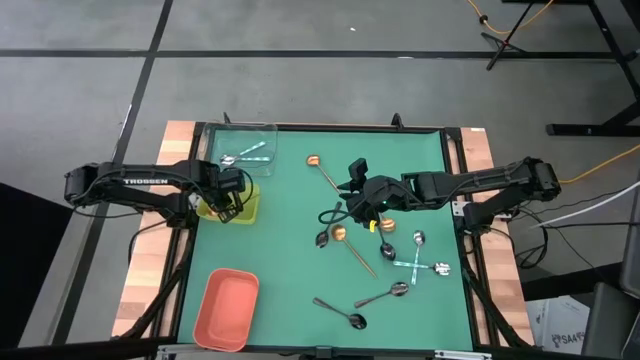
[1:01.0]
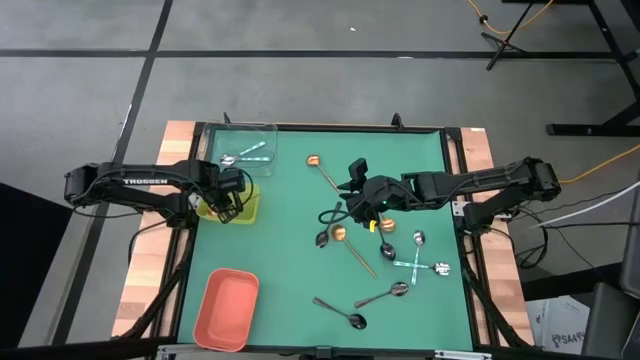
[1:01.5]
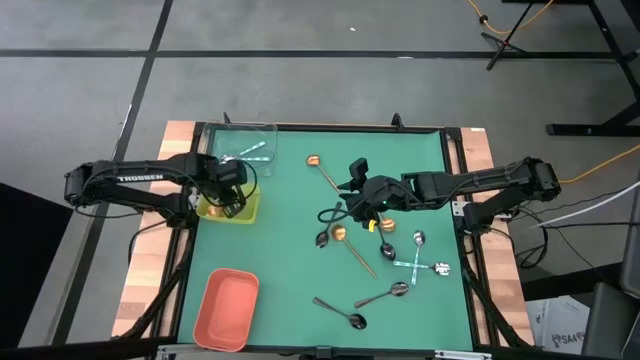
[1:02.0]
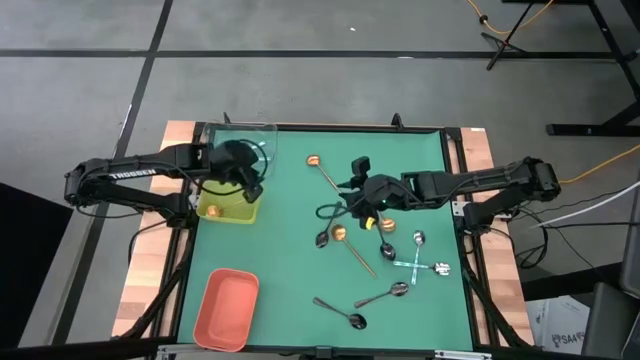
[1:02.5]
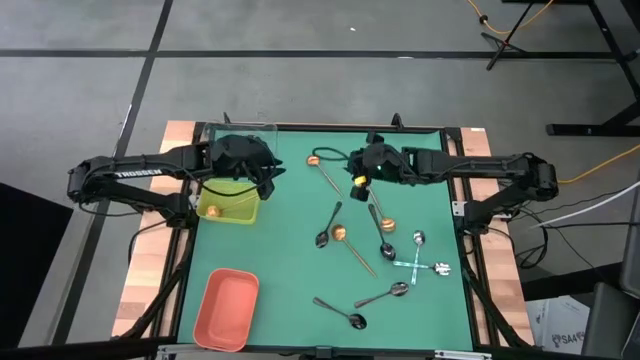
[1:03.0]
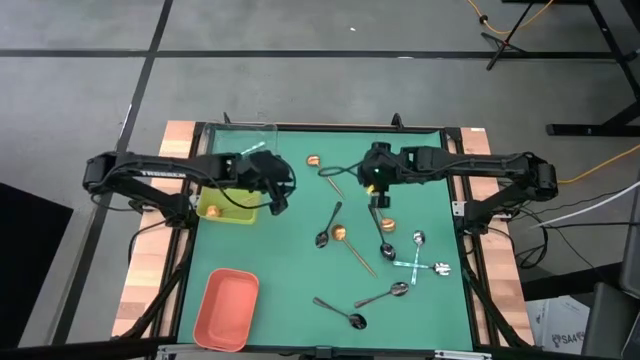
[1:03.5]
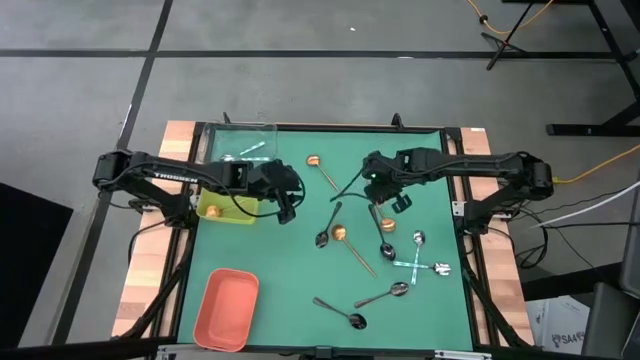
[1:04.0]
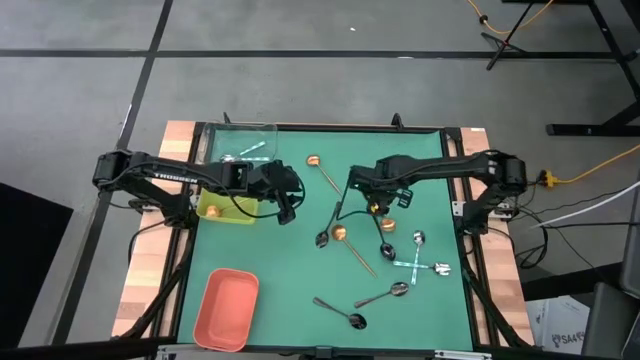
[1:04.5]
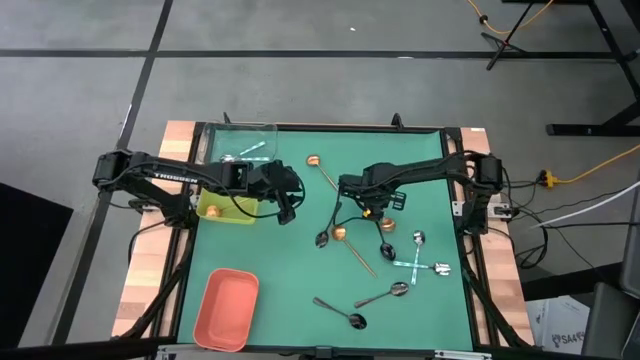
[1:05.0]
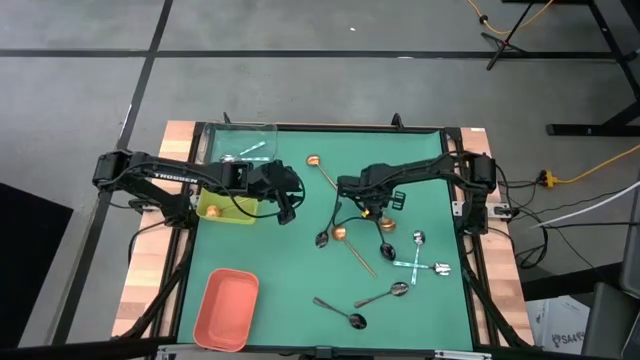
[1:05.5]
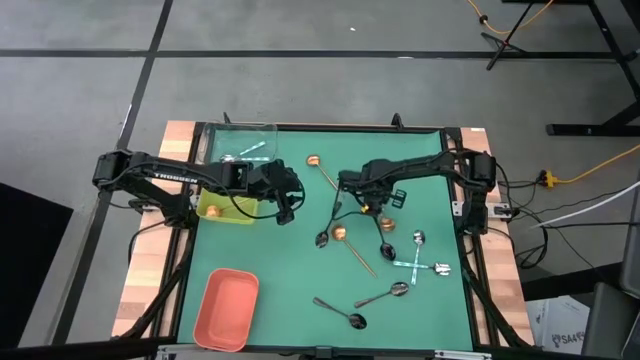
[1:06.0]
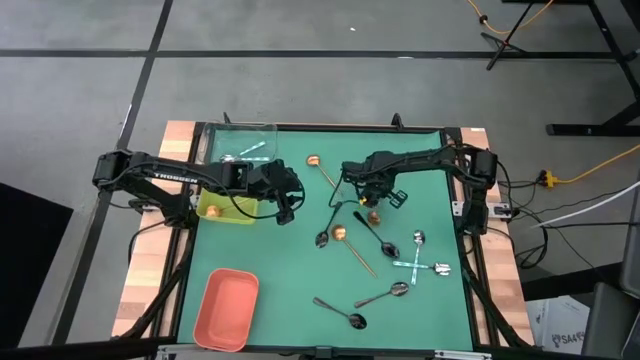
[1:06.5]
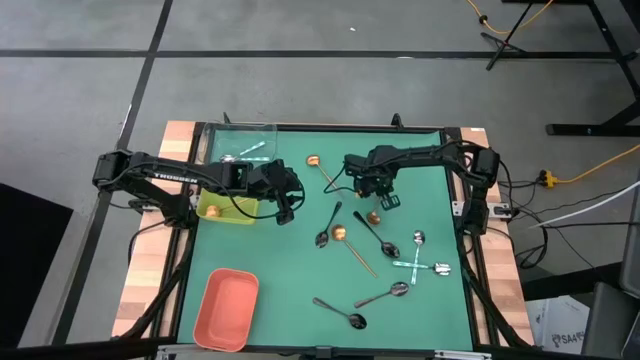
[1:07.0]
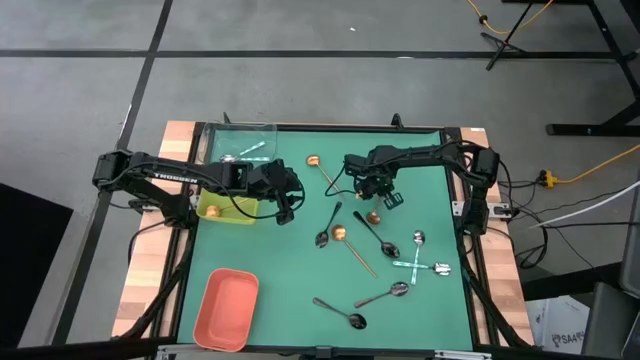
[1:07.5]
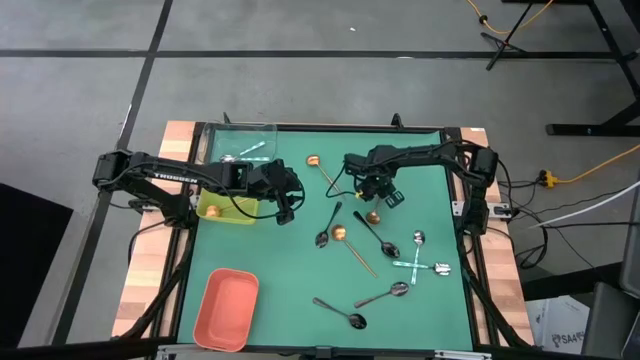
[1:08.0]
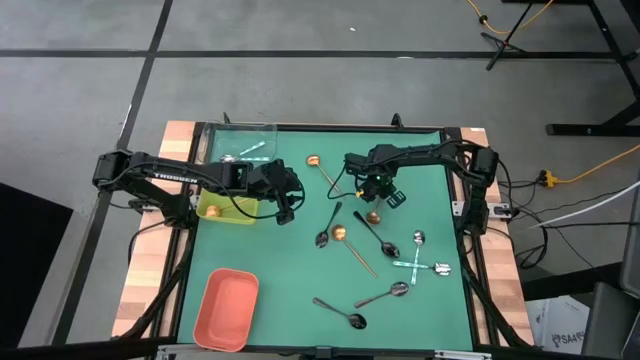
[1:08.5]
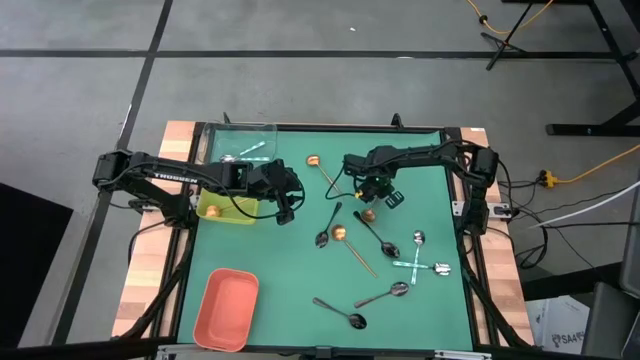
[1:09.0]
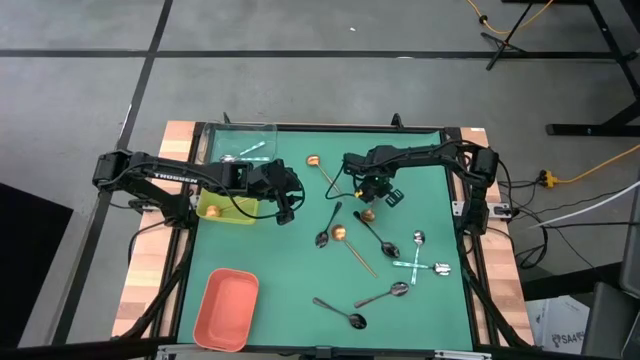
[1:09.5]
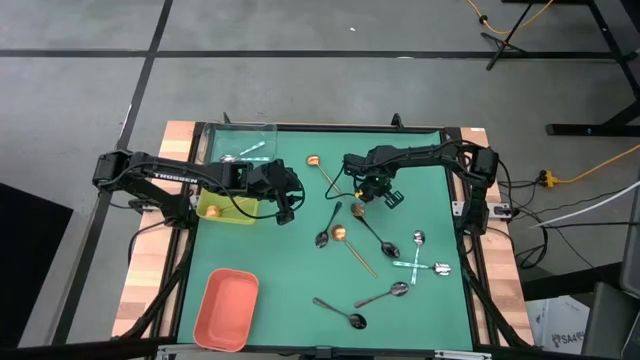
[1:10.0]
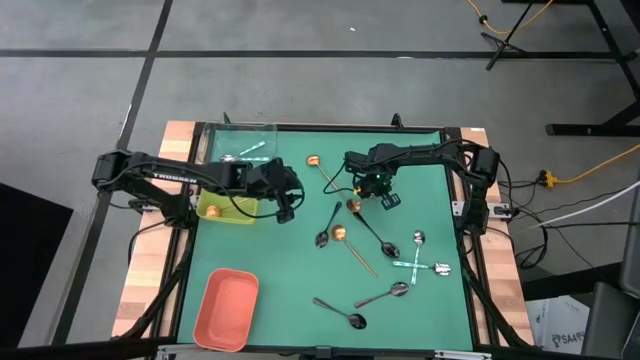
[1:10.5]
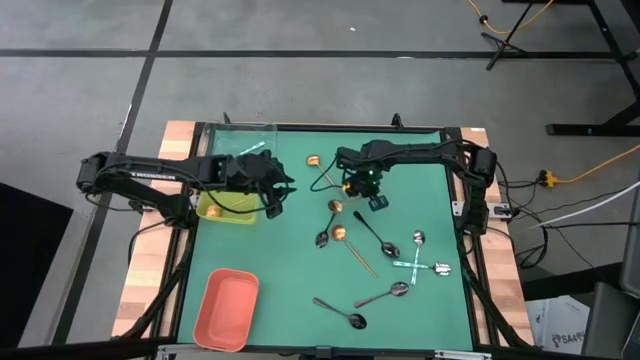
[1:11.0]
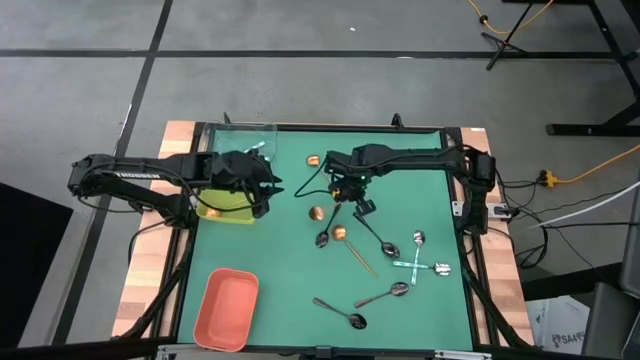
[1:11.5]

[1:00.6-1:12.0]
Task: Sort silverware by color (type)
Put the gold spoon into the yellow bin

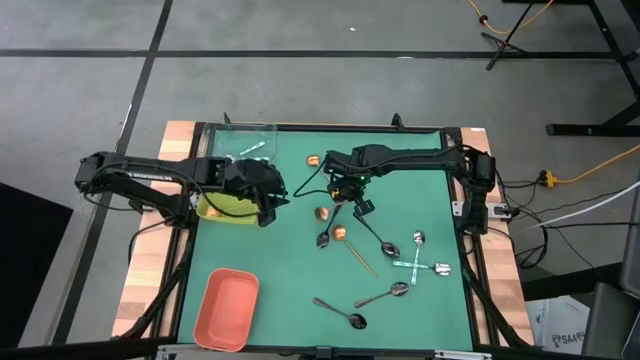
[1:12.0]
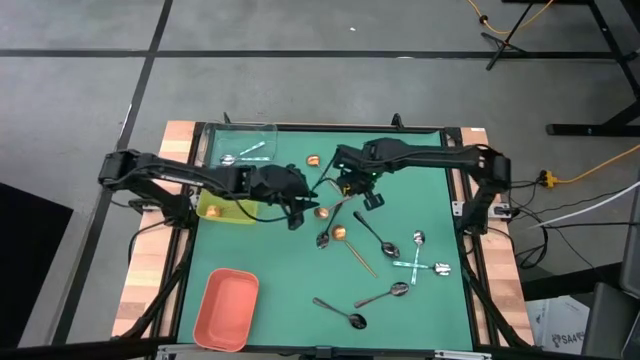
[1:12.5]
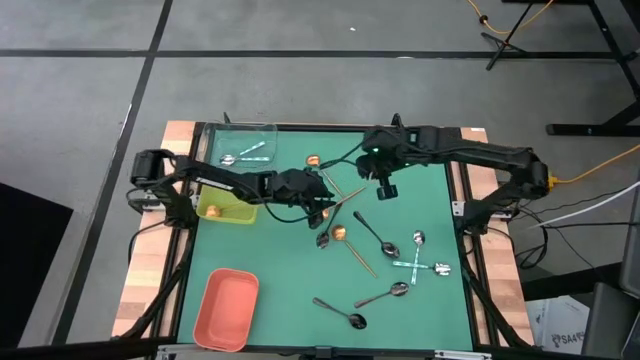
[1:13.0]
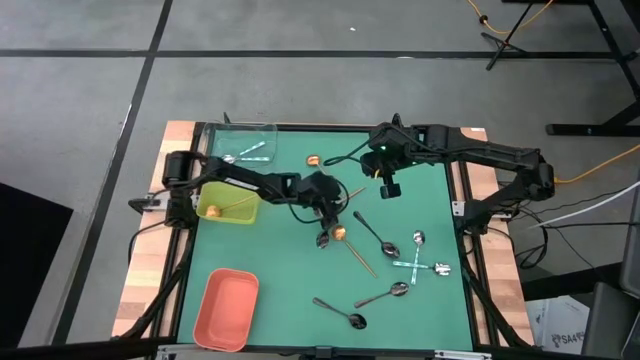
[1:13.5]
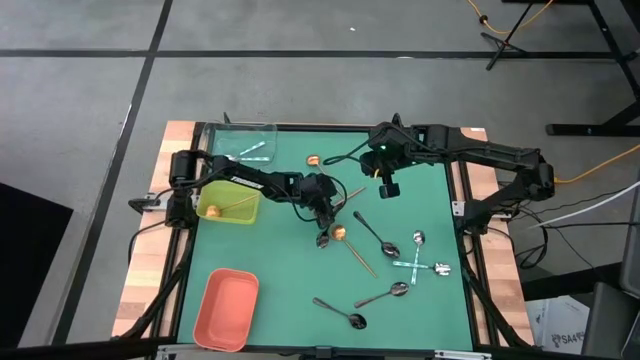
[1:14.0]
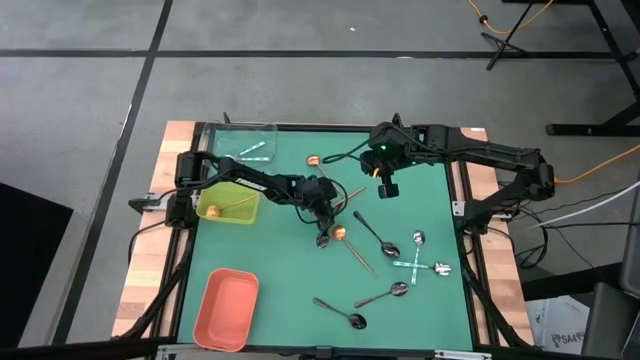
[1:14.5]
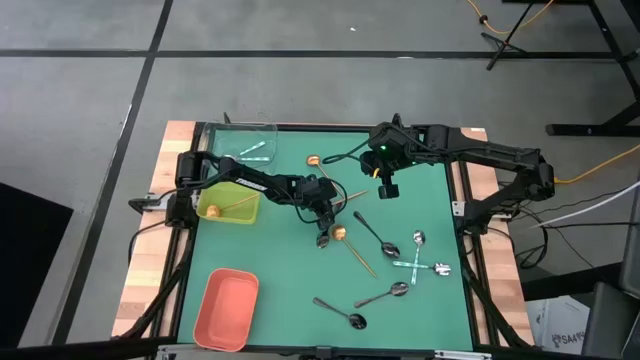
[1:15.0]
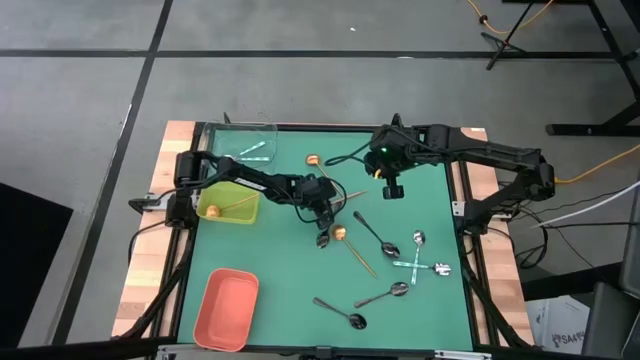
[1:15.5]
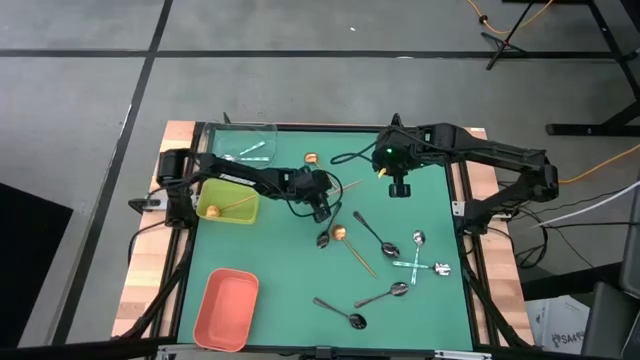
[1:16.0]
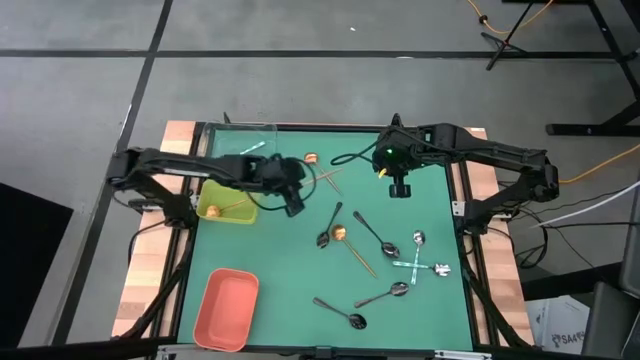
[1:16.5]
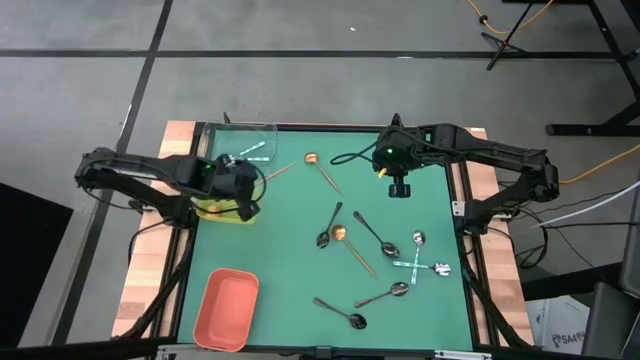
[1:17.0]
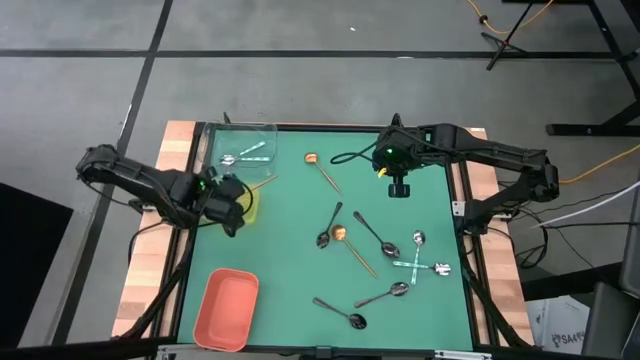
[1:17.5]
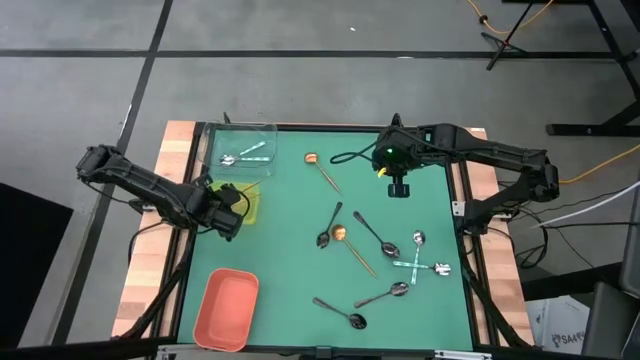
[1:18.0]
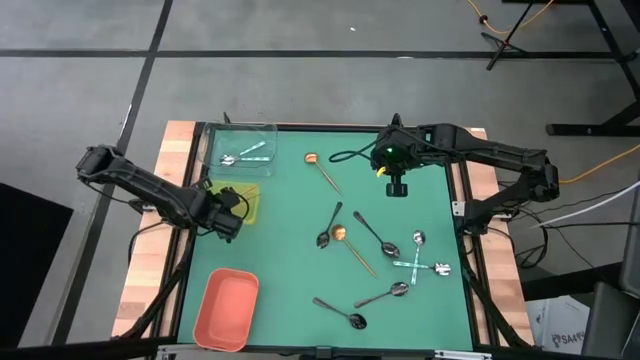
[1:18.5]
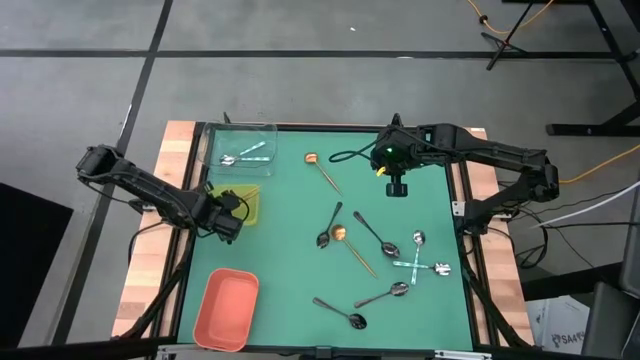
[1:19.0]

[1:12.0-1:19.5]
Put the gold spoon into the yellow bin
